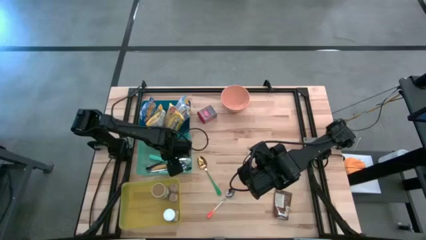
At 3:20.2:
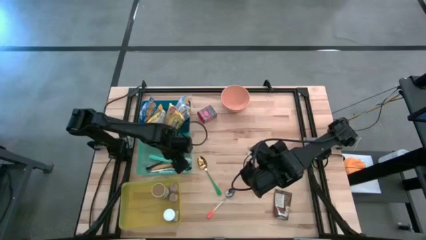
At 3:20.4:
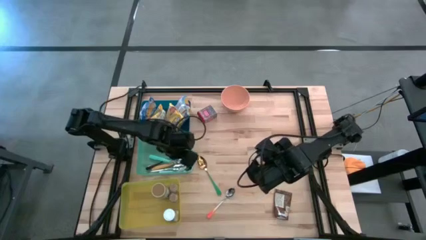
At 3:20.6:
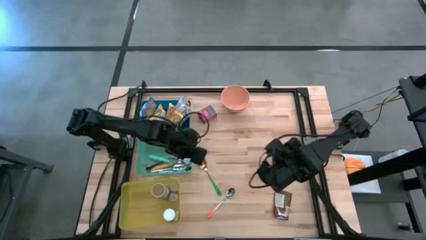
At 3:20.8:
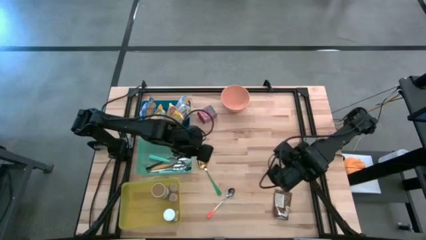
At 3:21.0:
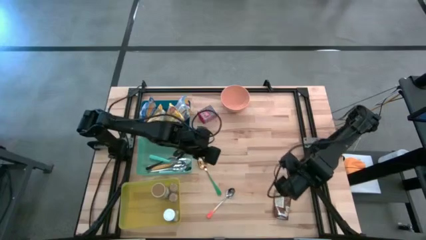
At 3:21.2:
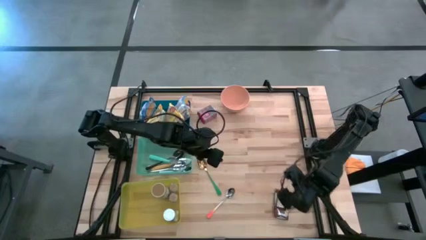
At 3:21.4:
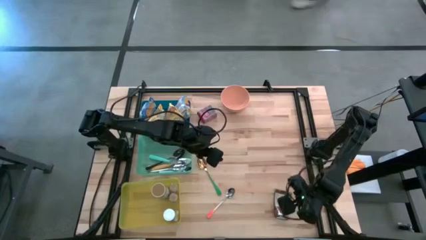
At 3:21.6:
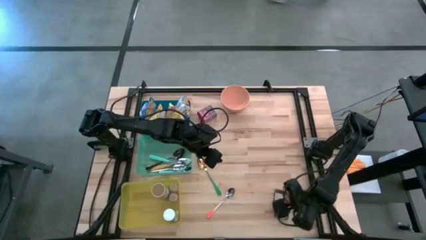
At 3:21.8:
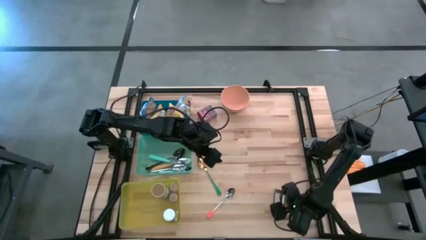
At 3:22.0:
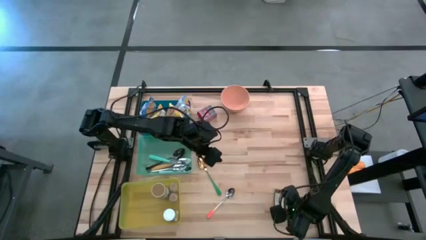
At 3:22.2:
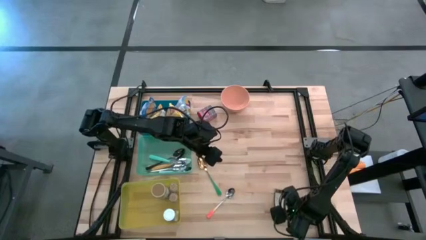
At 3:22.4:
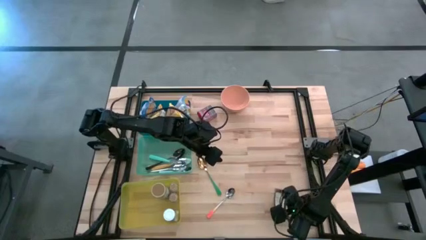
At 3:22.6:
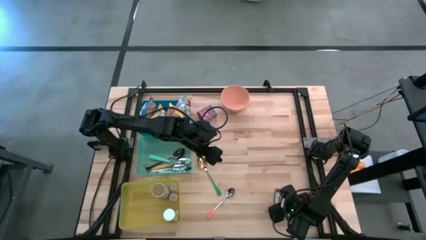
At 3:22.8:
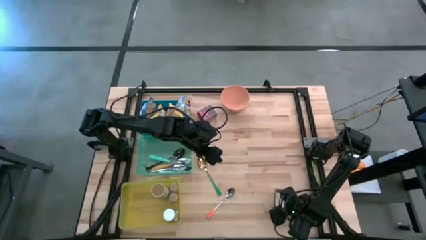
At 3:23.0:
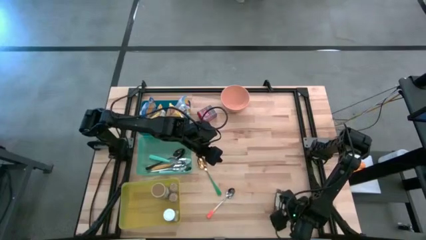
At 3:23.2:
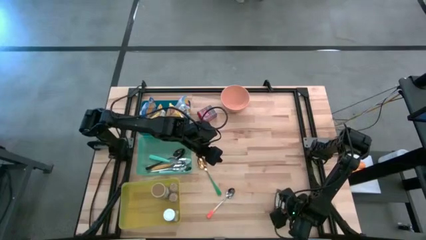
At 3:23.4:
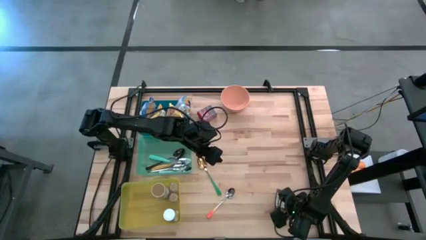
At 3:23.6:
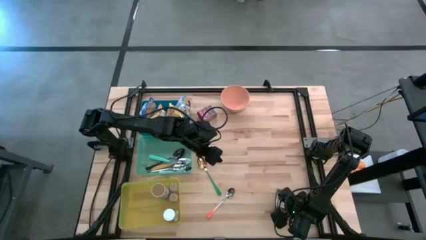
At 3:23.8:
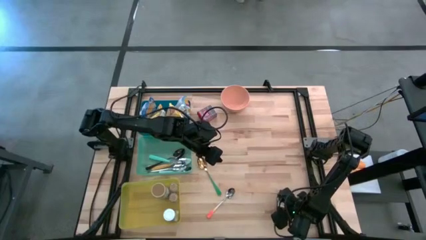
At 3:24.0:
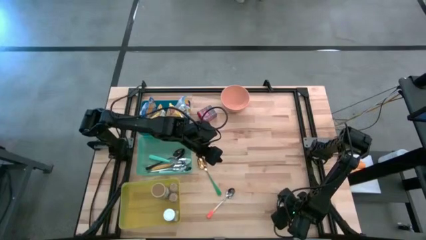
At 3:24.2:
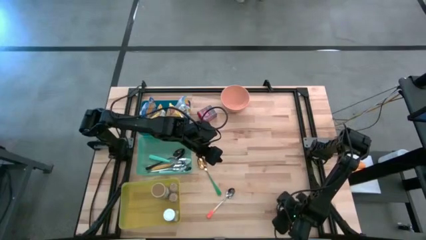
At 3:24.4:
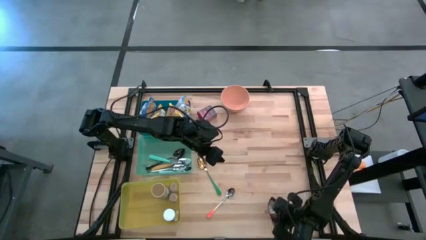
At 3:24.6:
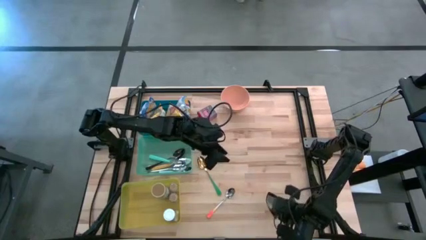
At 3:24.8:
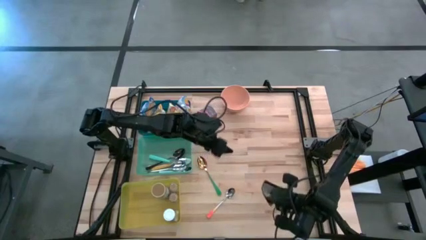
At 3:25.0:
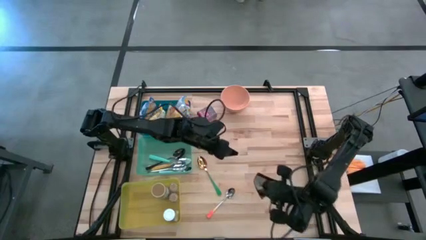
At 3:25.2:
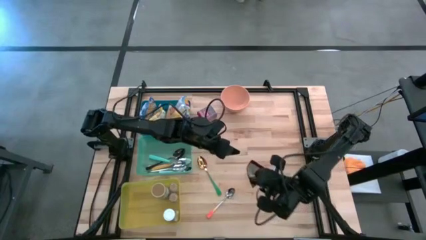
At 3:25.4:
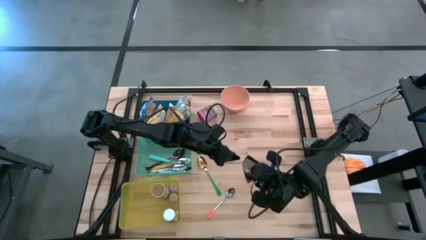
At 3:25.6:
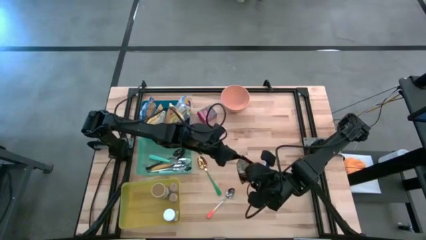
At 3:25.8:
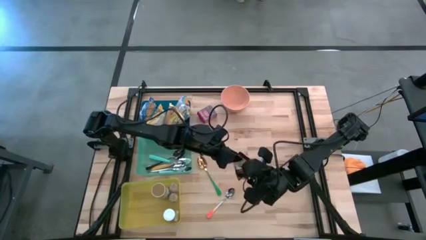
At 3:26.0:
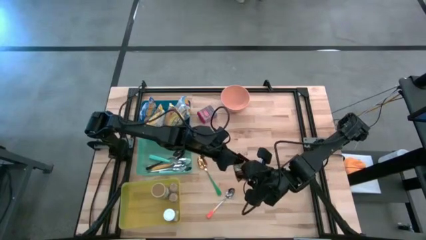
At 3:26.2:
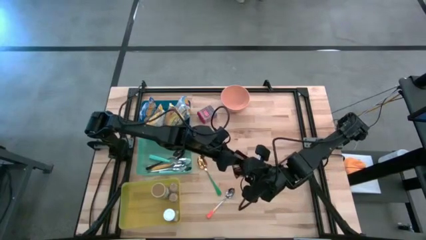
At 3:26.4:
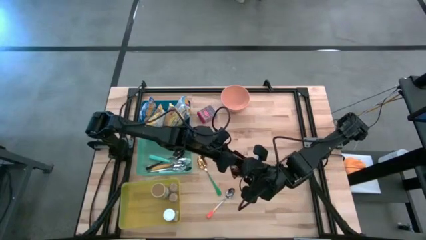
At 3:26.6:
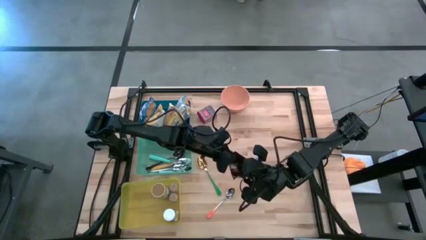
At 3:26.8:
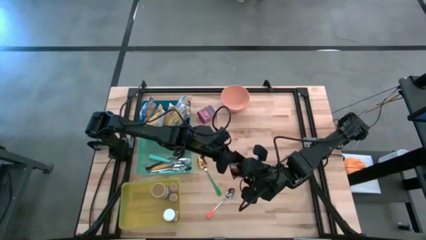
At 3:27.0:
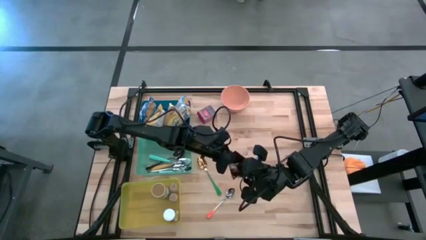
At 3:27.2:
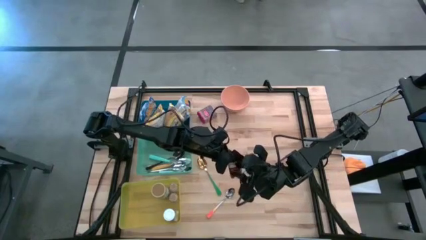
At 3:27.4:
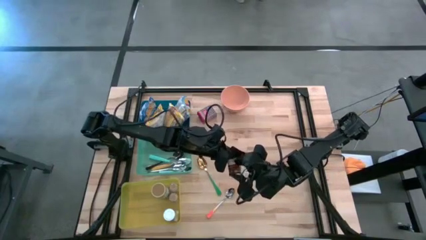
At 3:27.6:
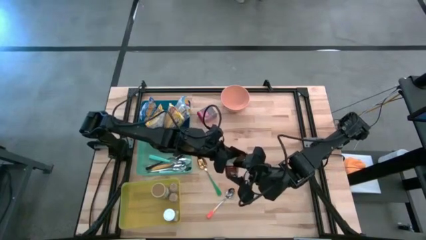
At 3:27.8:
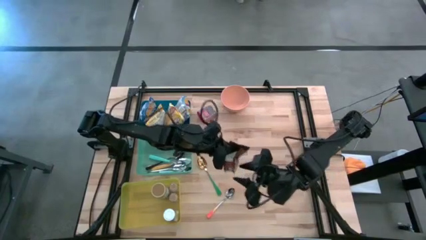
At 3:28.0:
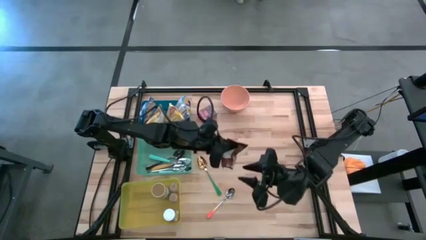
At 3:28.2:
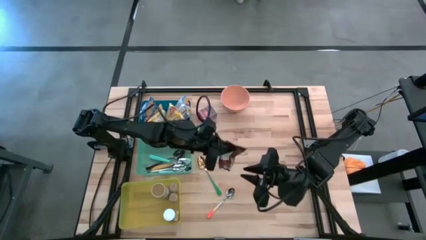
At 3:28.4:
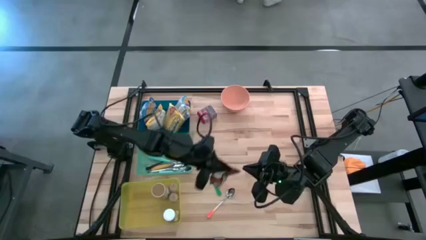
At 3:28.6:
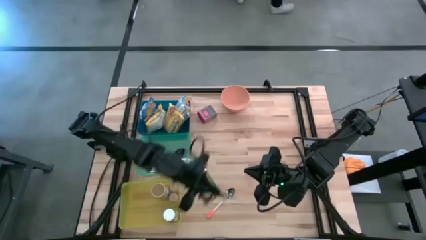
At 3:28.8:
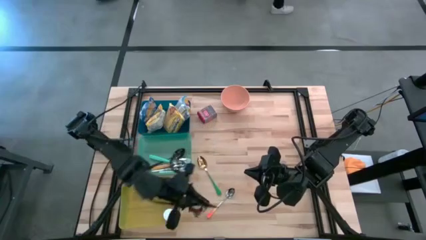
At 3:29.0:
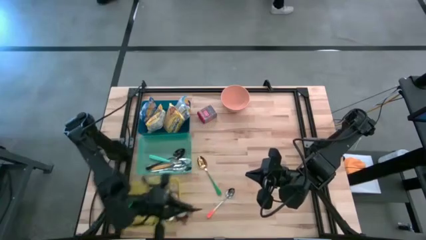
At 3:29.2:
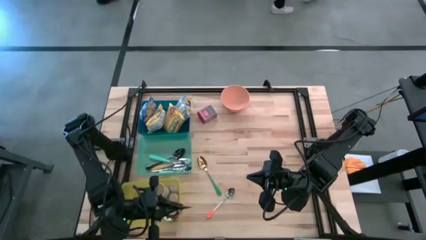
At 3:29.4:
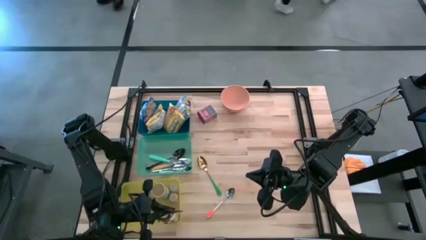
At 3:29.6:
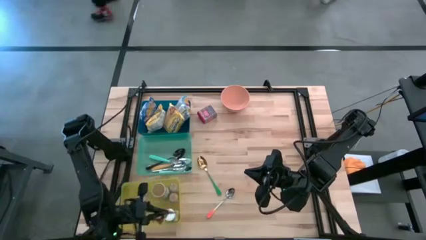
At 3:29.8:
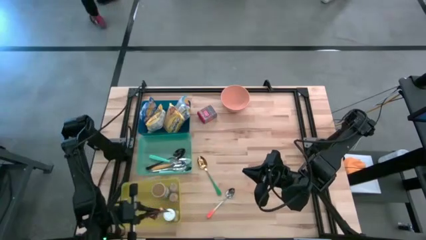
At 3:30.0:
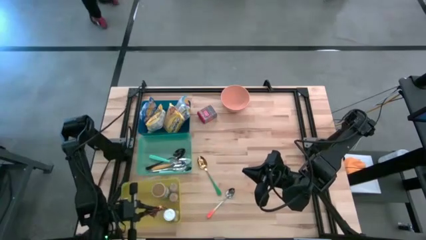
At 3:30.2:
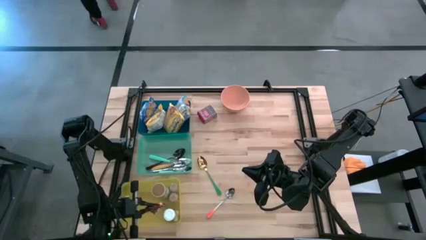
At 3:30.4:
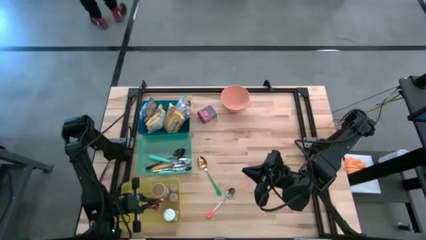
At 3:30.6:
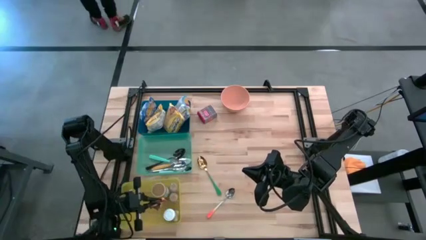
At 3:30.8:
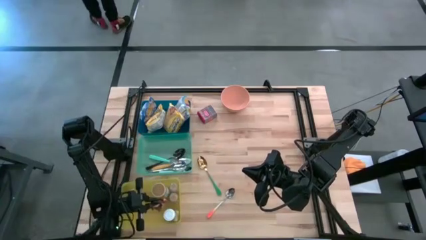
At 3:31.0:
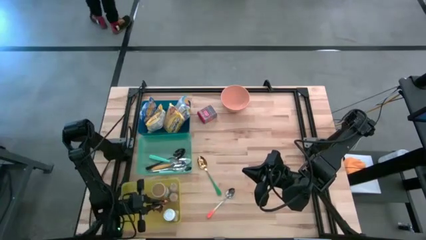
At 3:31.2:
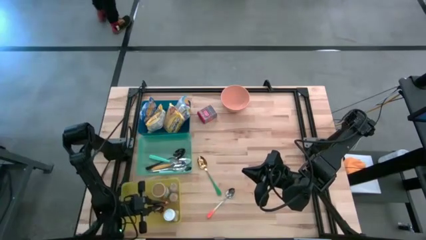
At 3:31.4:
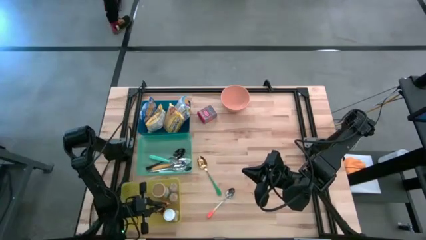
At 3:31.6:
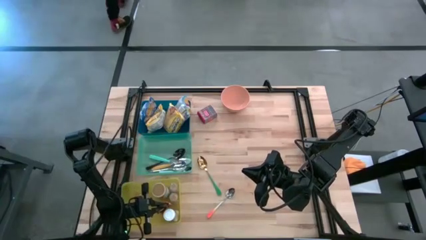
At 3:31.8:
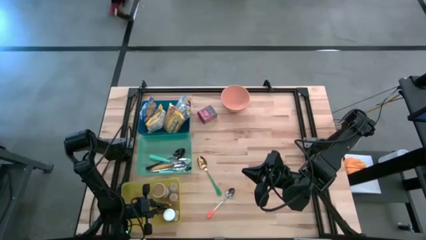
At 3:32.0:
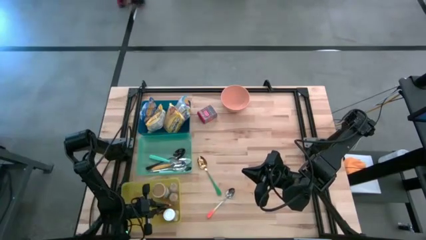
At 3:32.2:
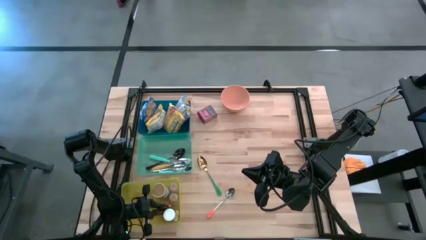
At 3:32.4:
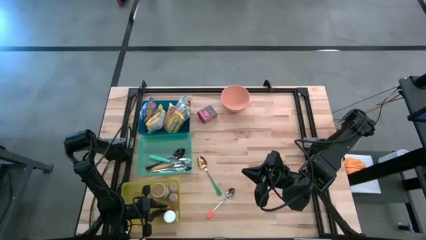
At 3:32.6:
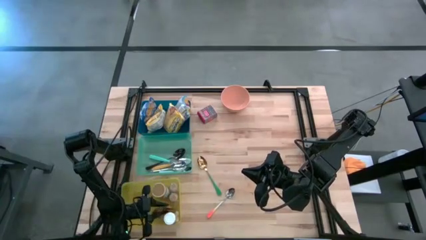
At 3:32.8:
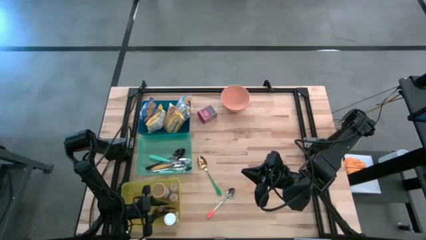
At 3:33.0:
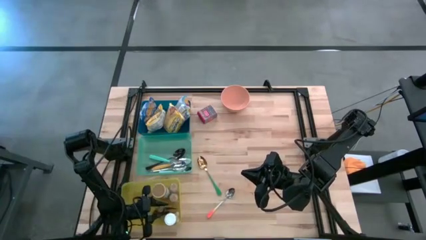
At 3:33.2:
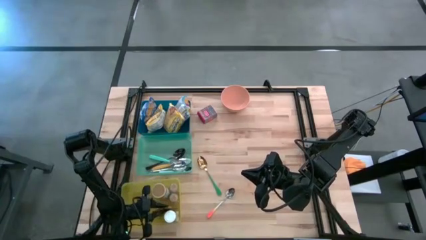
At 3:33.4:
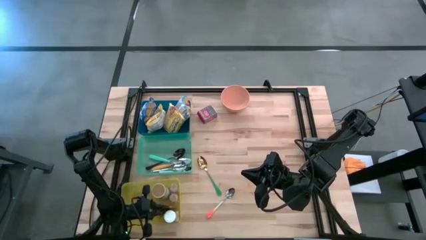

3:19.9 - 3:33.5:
Put the orange spice pack into the yellow bin
